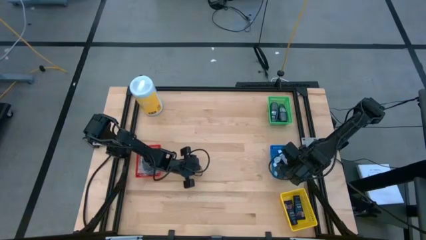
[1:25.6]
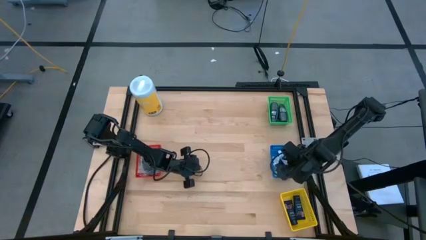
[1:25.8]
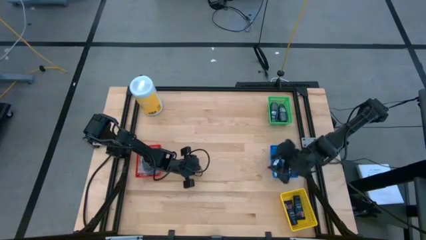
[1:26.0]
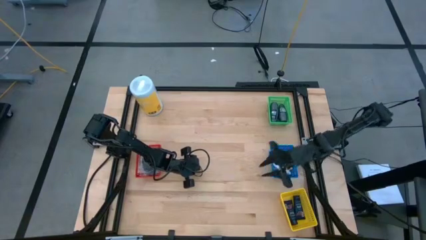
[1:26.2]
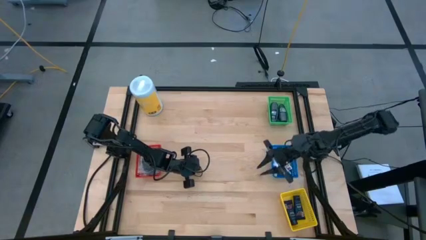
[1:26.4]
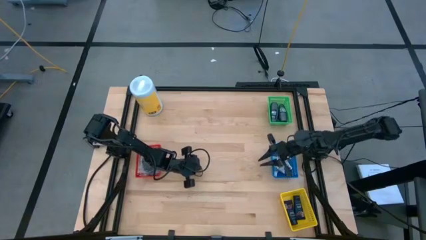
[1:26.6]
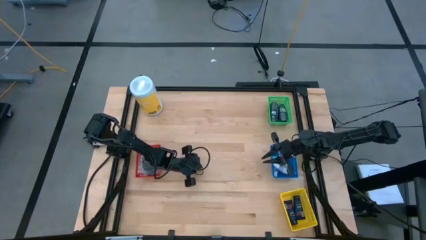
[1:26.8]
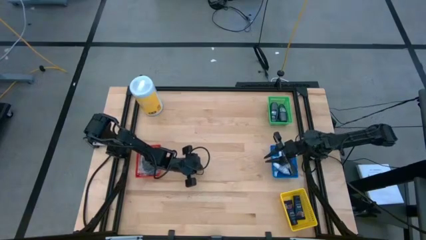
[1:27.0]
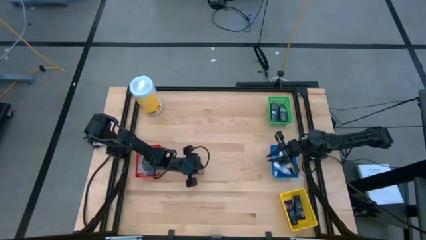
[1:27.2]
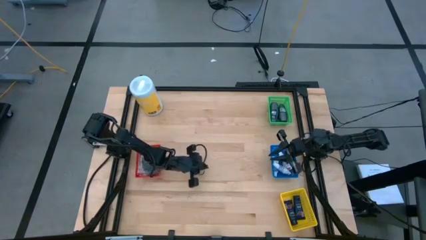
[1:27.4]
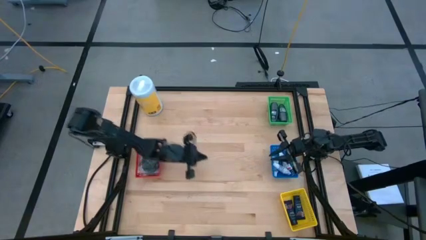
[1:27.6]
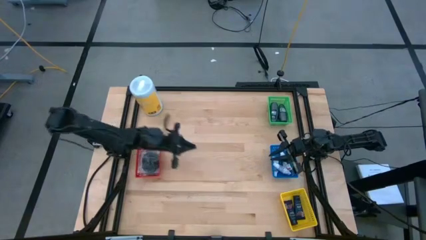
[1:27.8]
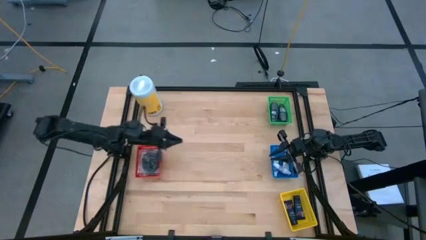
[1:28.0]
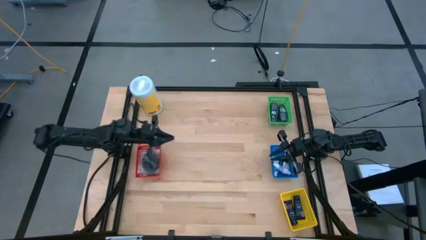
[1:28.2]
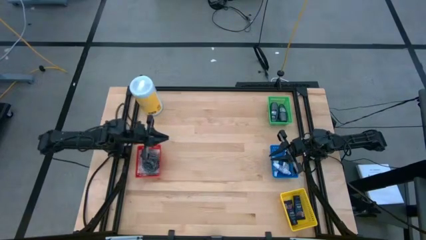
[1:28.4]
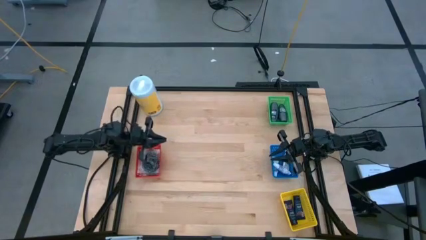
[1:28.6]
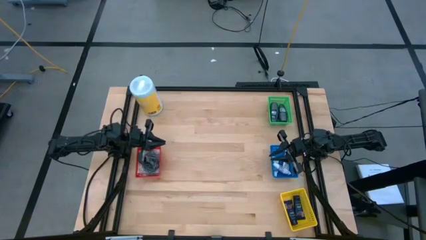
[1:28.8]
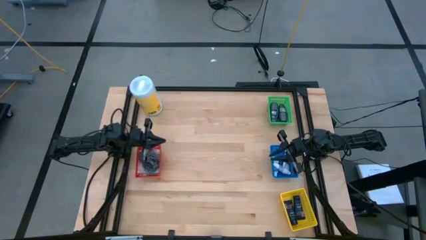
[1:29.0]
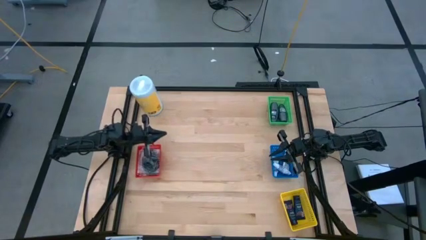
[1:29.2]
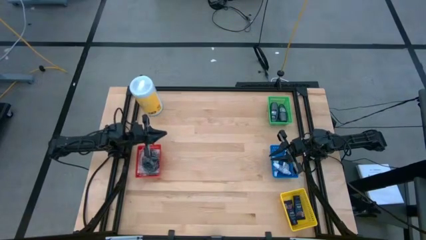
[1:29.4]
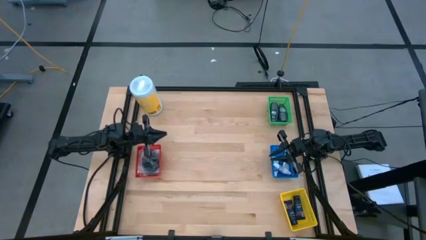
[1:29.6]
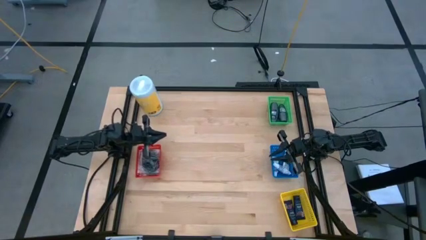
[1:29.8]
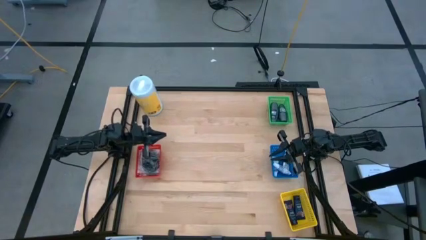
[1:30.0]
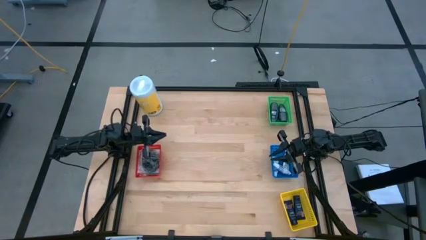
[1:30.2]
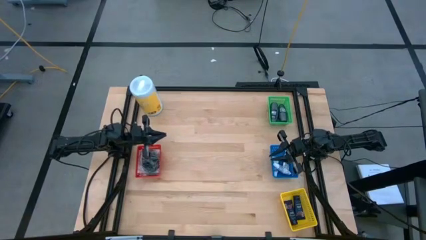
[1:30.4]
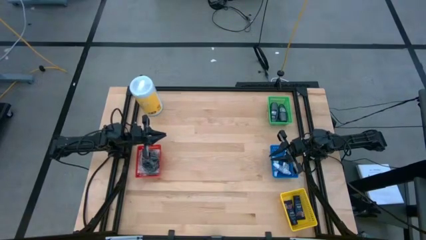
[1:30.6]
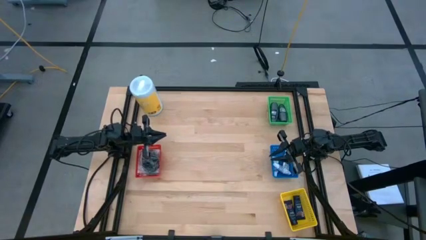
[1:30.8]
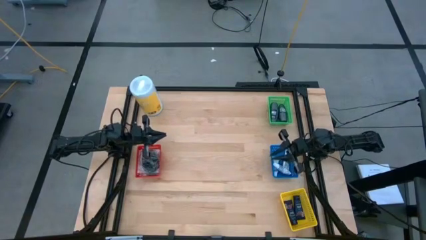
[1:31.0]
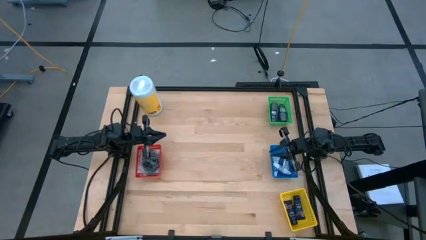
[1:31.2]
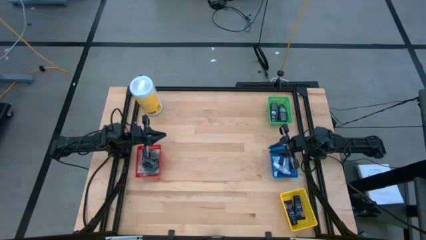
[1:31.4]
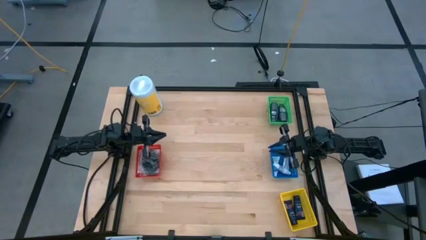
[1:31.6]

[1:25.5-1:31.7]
Task: Pick & Place Travel size toiletries
Return to Home Position

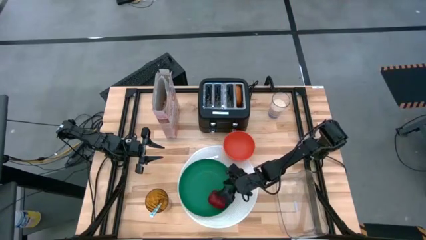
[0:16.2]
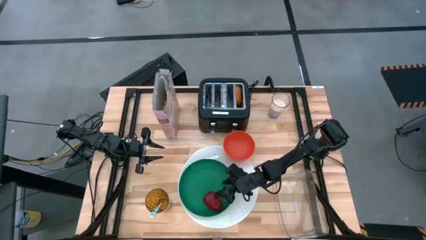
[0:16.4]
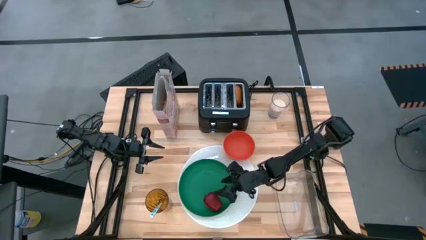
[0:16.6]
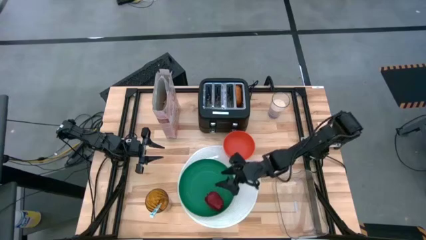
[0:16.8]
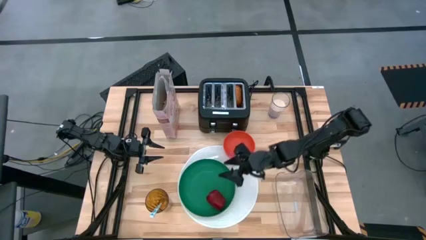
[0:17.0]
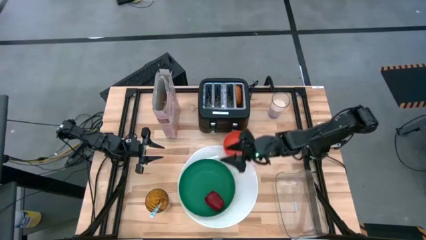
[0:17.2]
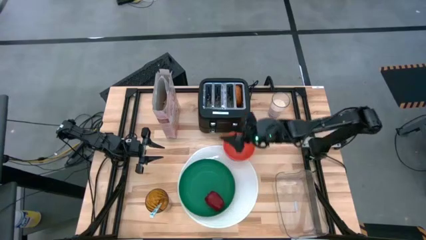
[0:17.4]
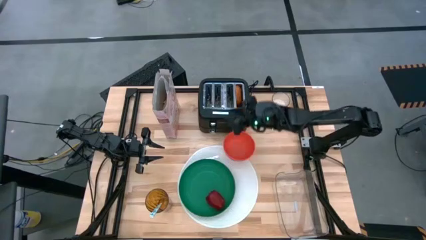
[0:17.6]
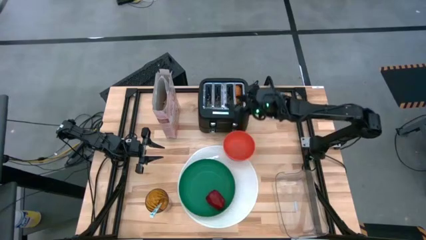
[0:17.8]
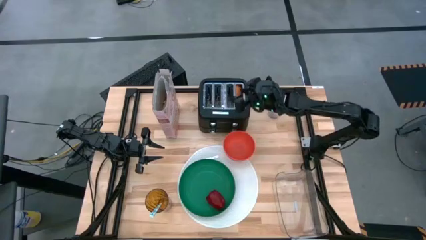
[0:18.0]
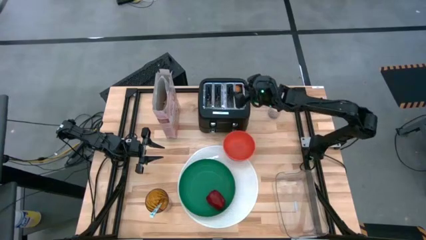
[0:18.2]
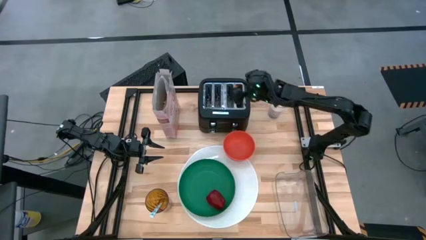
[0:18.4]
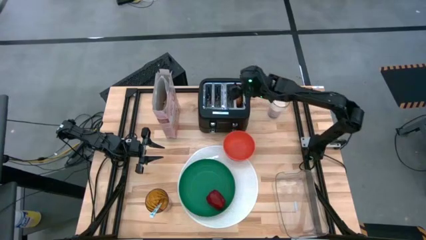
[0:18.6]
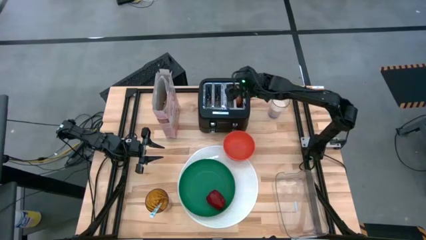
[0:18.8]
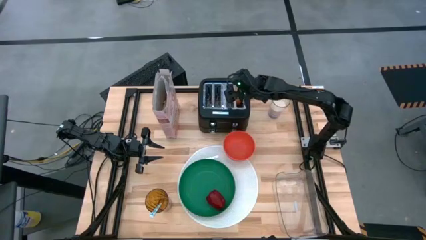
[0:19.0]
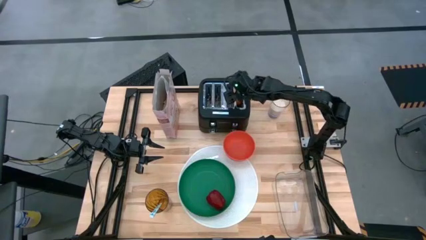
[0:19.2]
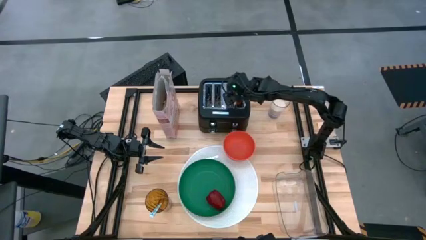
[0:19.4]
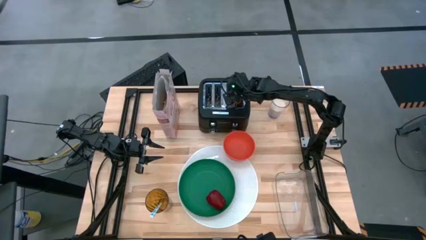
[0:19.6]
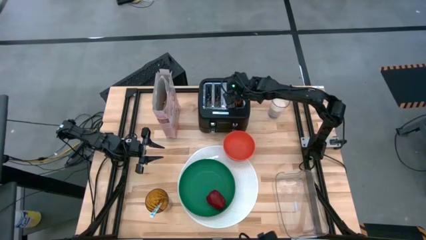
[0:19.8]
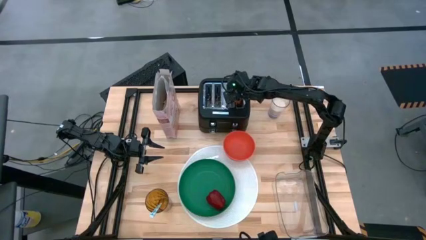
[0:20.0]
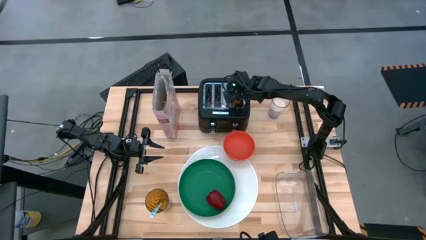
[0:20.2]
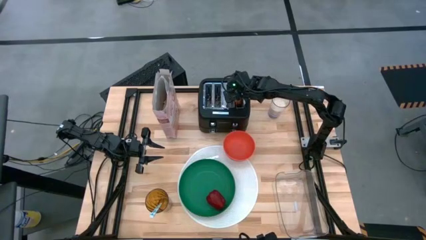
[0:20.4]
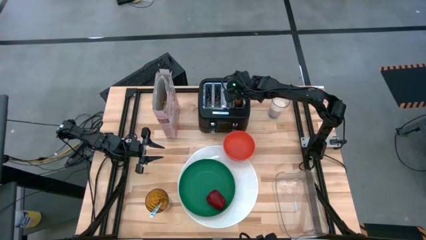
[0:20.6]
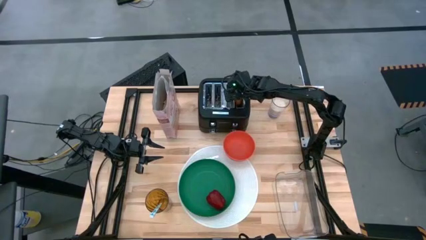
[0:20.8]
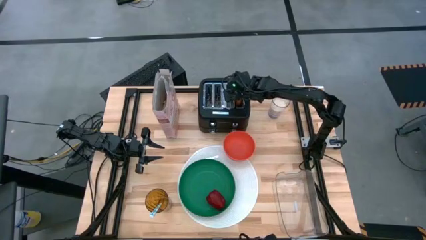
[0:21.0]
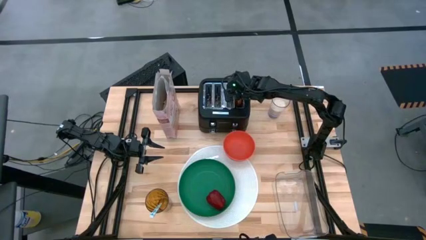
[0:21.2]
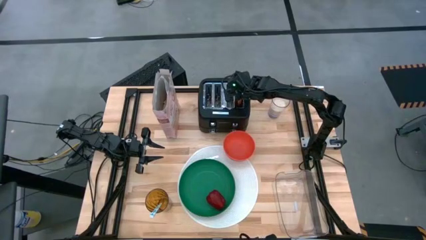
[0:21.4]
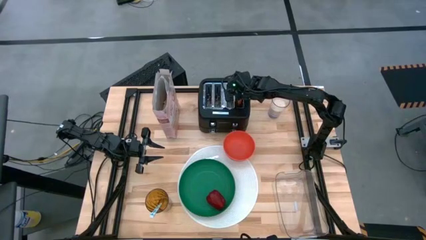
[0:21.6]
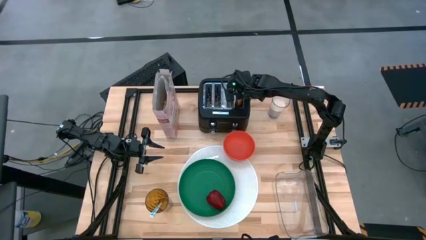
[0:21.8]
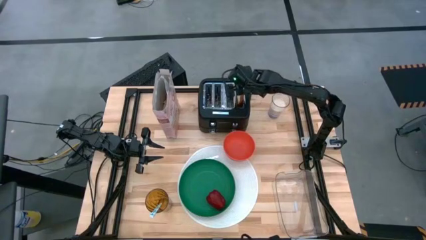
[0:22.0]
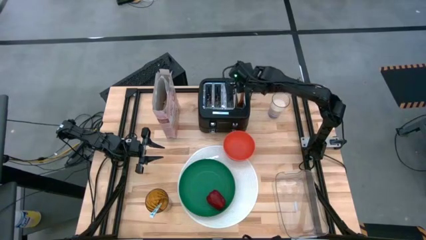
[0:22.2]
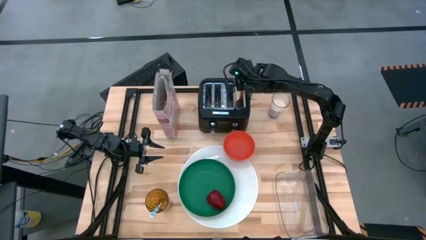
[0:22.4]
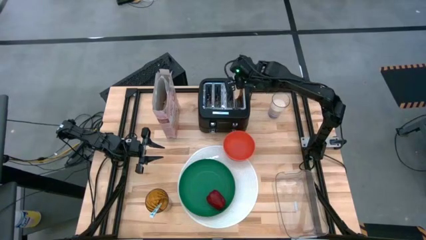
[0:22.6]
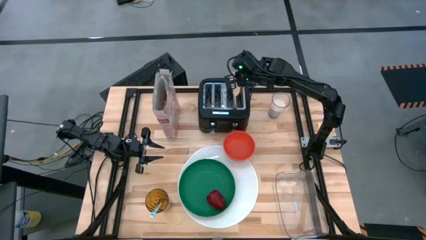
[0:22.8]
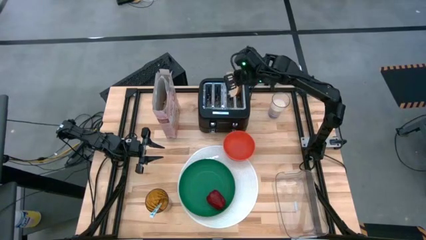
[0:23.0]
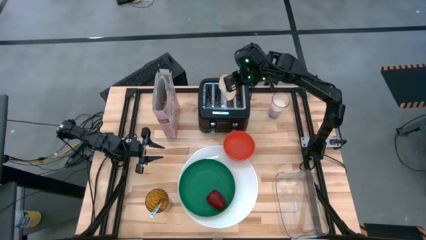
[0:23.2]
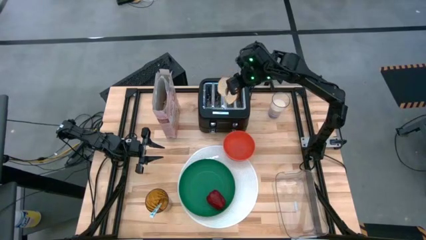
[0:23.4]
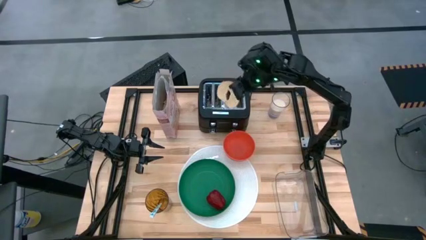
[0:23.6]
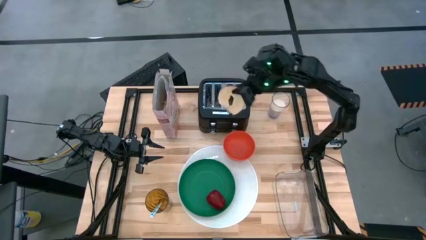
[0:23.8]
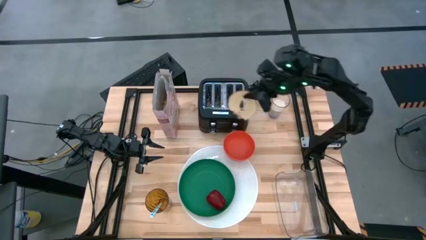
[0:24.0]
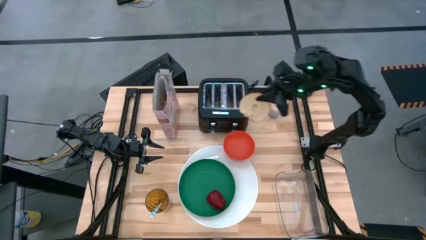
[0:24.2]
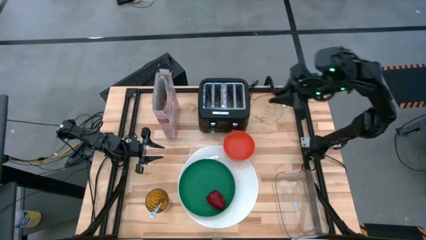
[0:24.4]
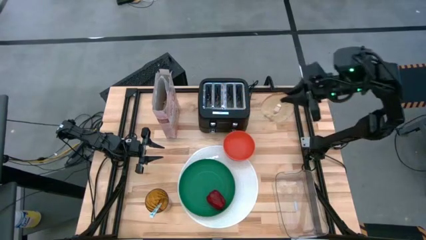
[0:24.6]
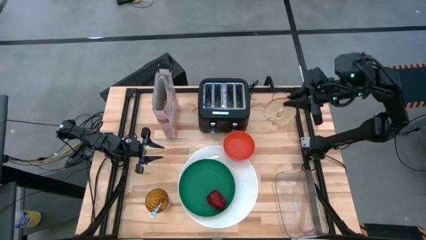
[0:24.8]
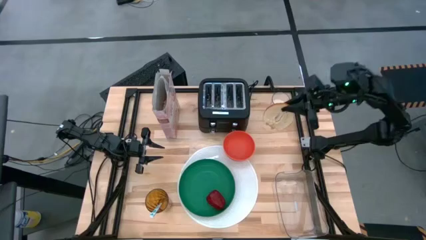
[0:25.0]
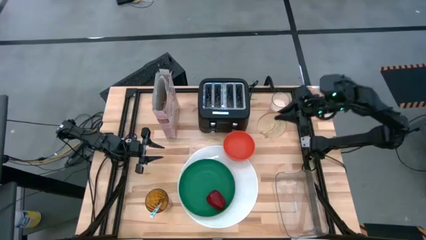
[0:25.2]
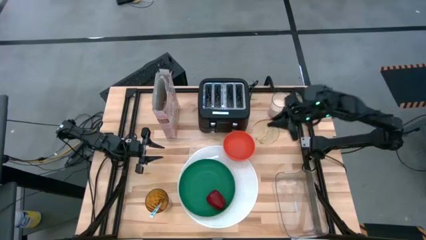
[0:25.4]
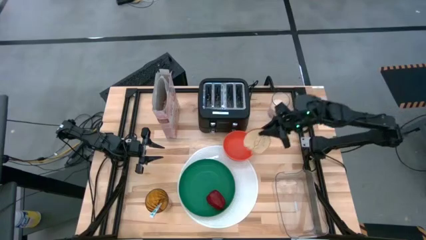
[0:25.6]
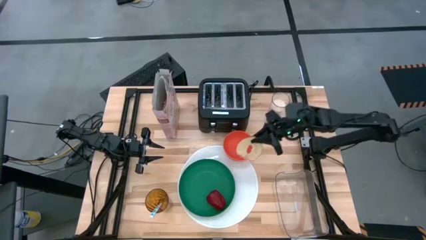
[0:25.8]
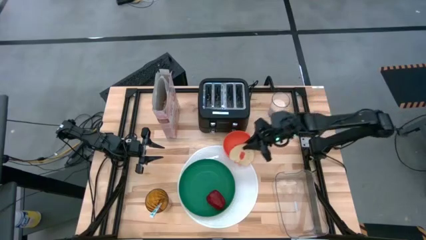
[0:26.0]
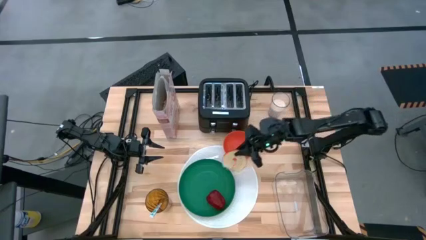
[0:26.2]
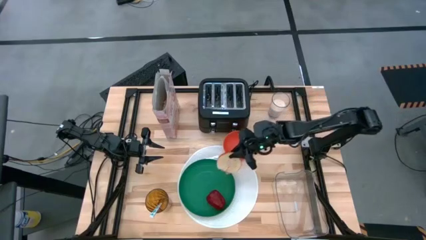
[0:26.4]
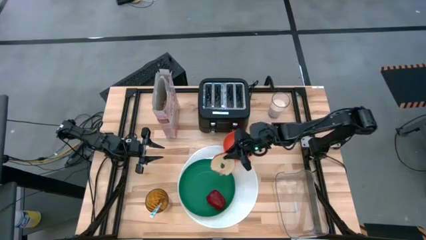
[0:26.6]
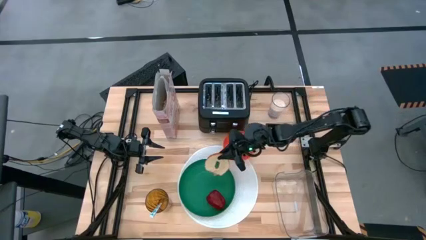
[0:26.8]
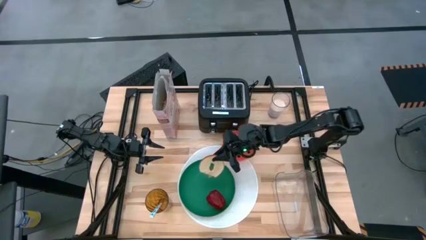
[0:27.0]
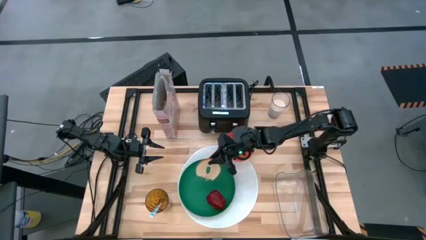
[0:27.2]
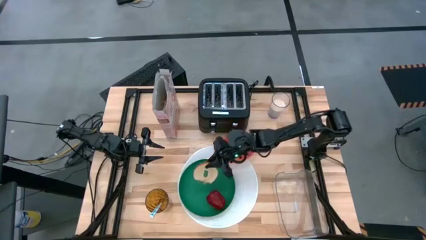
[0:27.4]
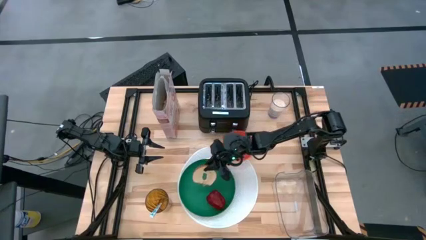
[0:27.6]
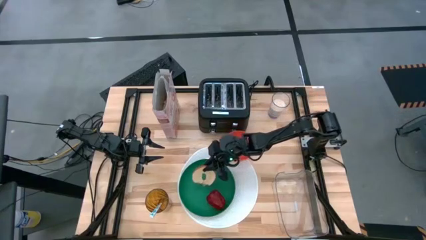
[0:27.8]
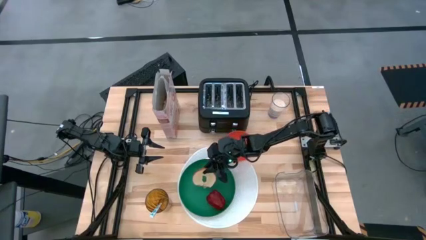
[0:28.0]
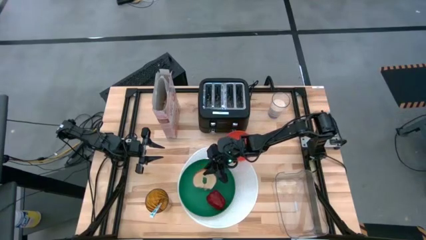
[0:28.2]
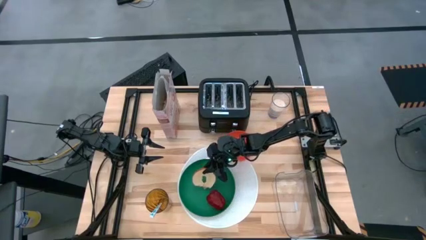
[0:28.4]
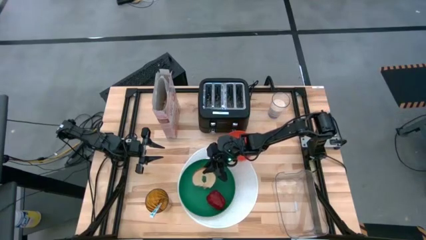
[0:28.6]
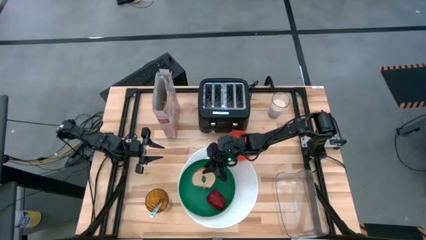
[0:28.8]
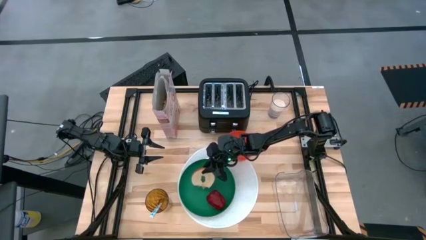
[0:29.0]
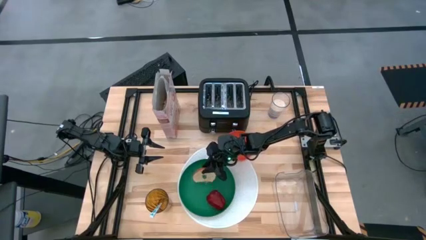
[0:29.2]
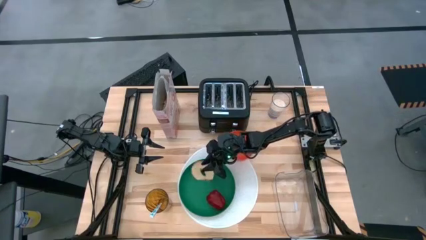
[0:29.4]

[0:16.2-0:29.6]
Task: Arrange a breakfast setting
Put the bagel on the green plate from the toaster
